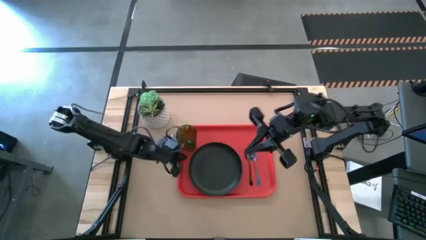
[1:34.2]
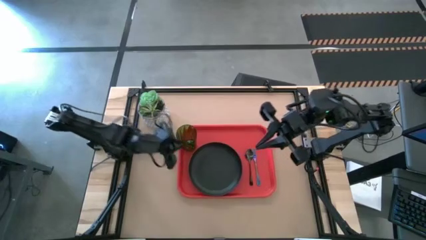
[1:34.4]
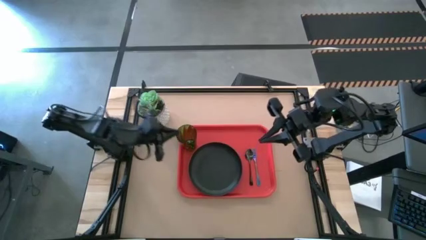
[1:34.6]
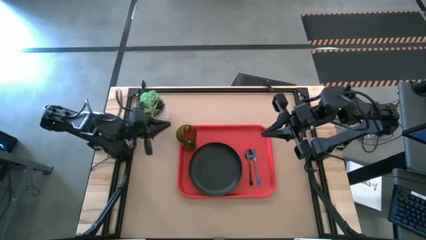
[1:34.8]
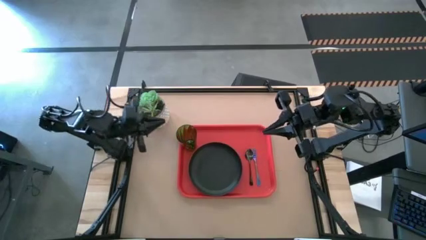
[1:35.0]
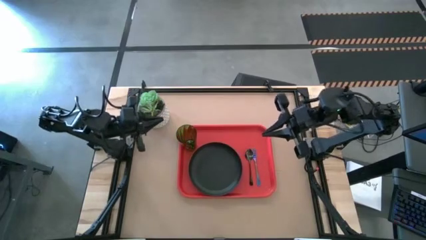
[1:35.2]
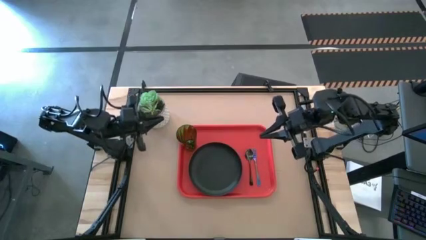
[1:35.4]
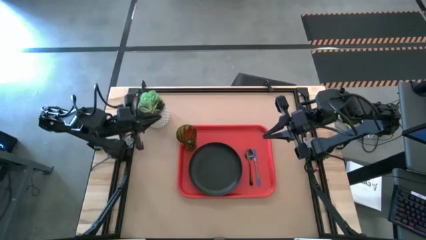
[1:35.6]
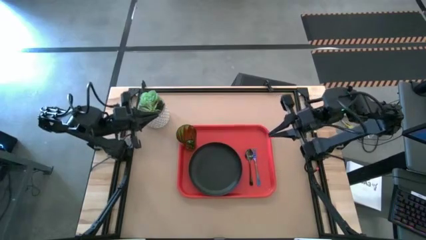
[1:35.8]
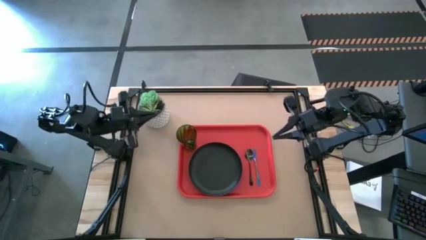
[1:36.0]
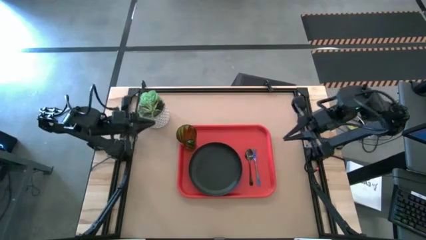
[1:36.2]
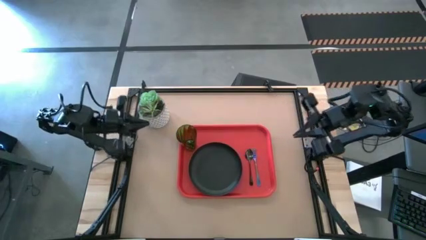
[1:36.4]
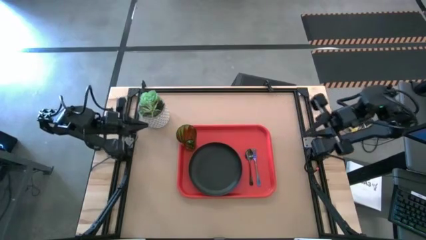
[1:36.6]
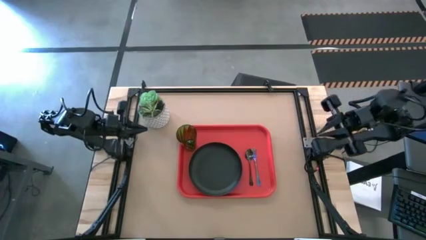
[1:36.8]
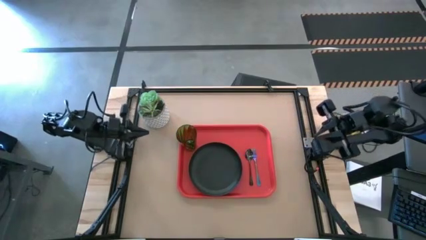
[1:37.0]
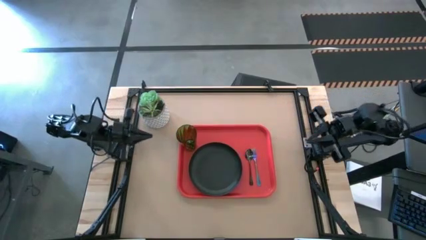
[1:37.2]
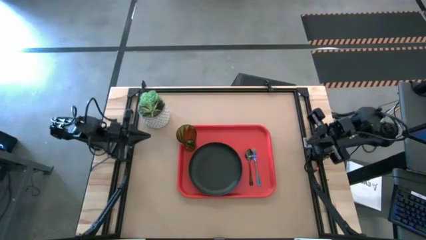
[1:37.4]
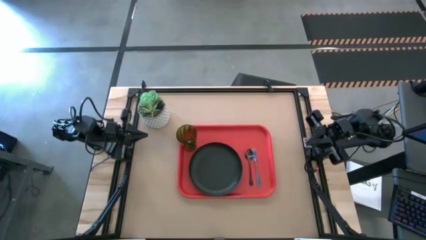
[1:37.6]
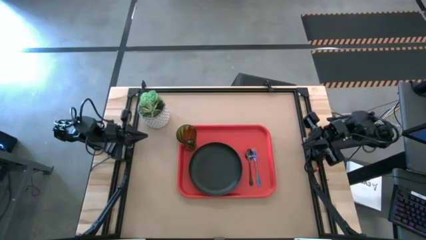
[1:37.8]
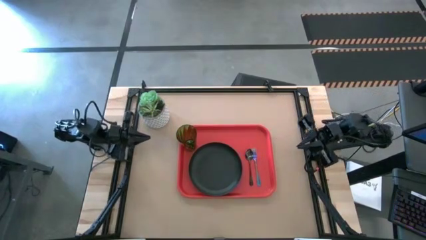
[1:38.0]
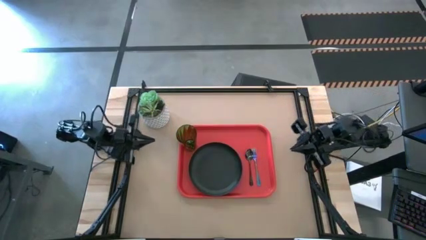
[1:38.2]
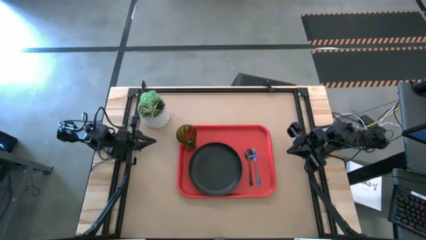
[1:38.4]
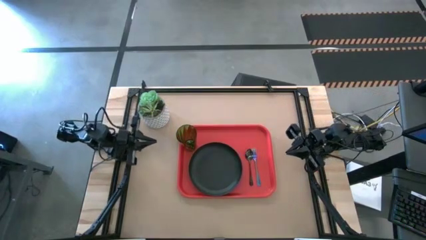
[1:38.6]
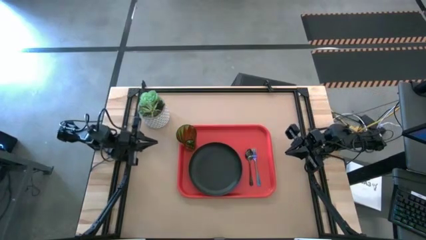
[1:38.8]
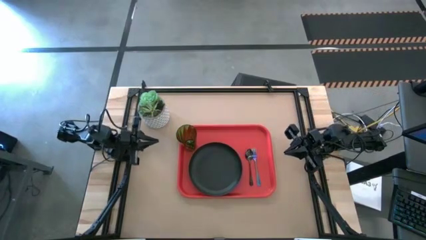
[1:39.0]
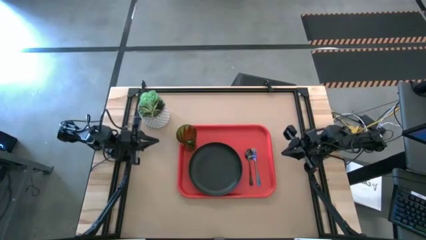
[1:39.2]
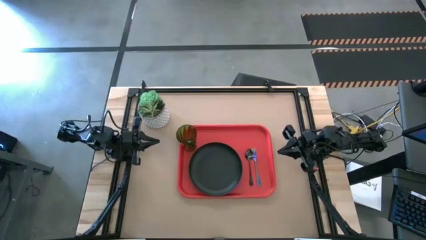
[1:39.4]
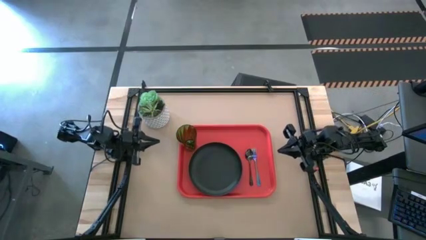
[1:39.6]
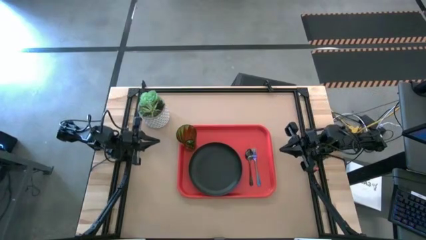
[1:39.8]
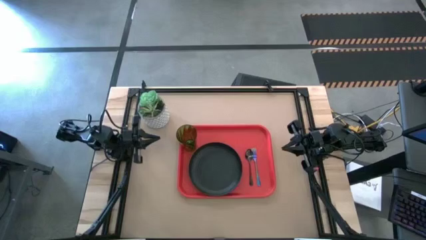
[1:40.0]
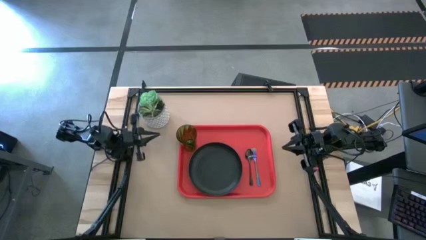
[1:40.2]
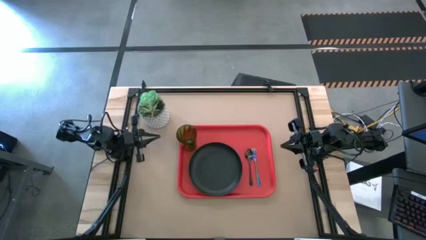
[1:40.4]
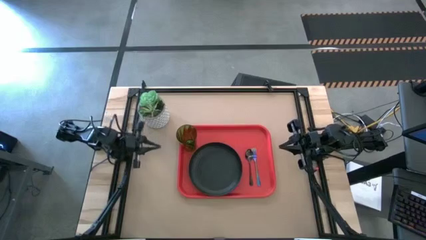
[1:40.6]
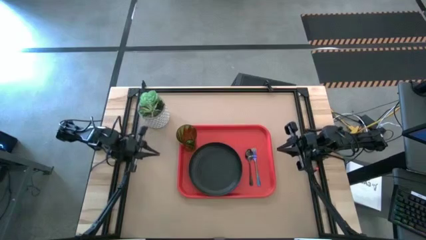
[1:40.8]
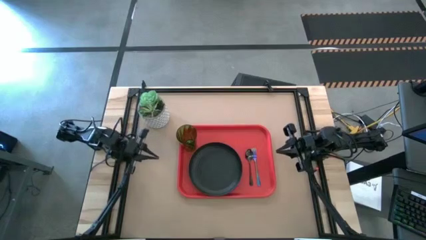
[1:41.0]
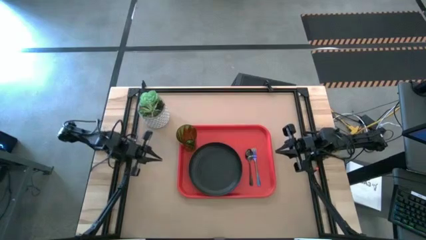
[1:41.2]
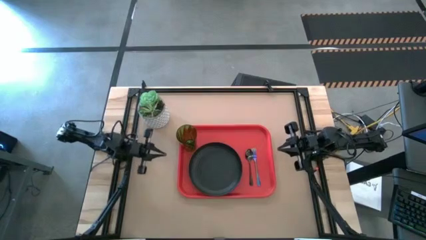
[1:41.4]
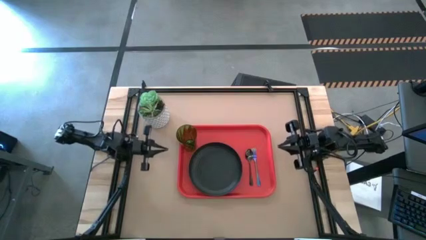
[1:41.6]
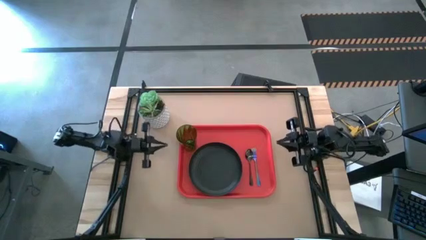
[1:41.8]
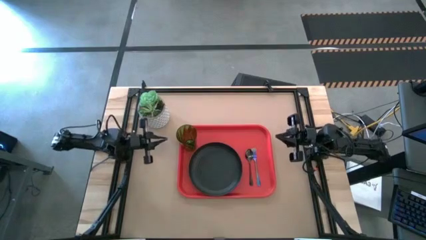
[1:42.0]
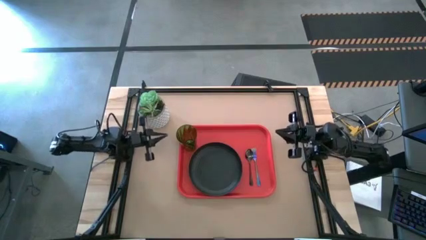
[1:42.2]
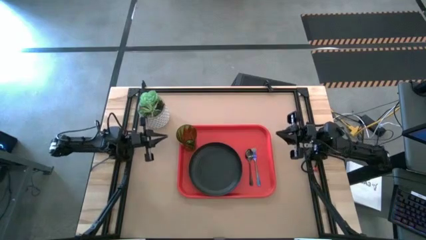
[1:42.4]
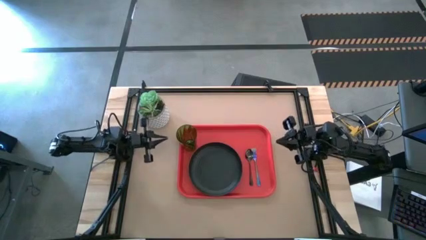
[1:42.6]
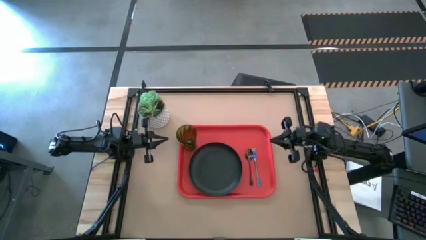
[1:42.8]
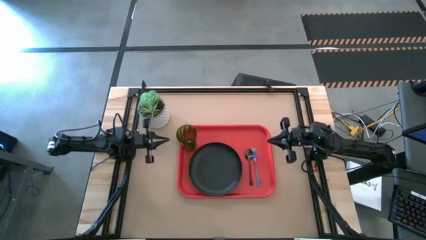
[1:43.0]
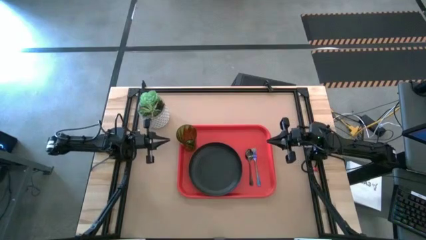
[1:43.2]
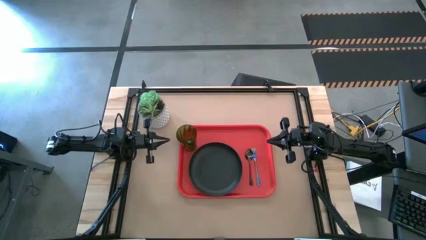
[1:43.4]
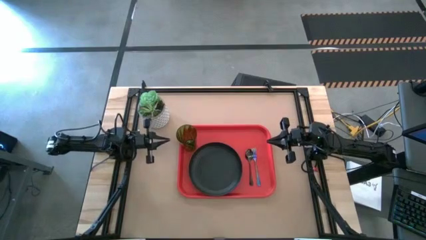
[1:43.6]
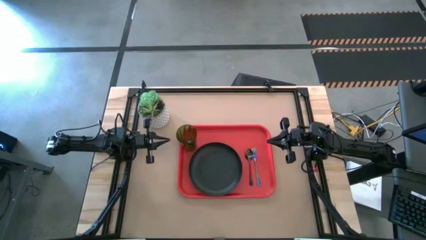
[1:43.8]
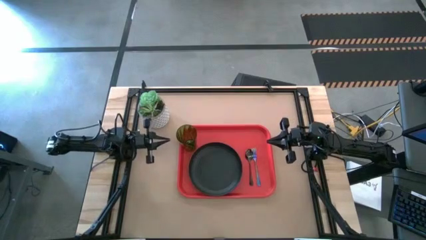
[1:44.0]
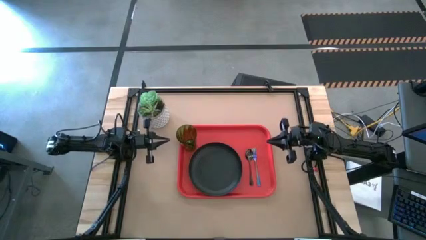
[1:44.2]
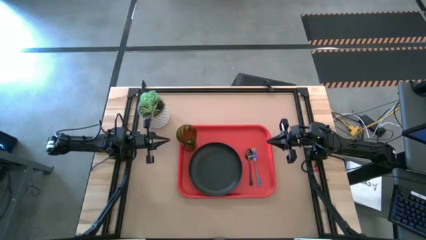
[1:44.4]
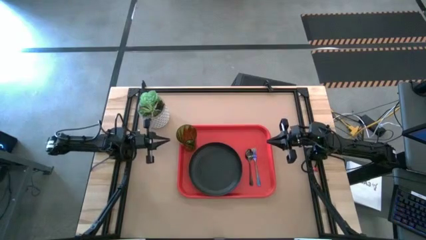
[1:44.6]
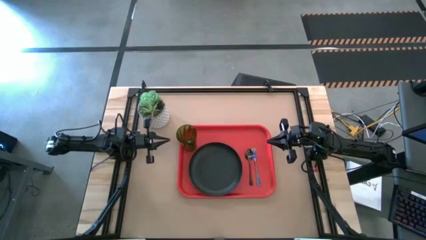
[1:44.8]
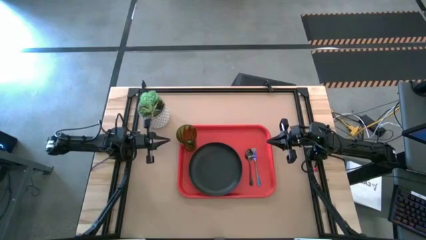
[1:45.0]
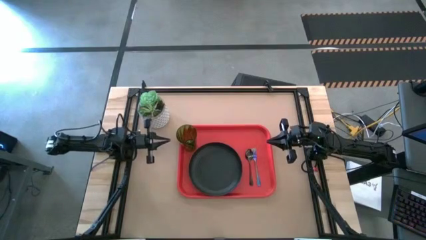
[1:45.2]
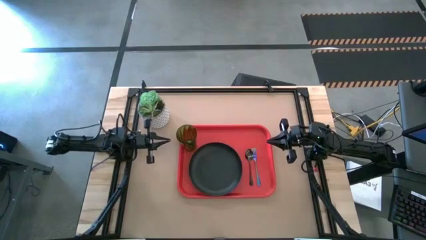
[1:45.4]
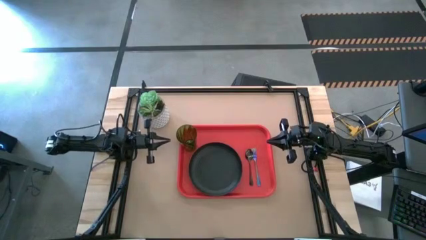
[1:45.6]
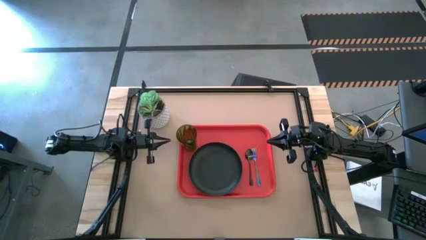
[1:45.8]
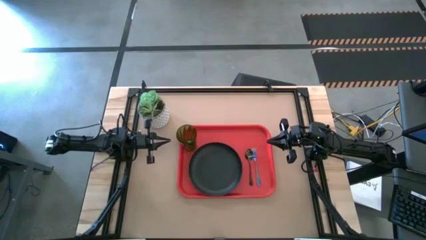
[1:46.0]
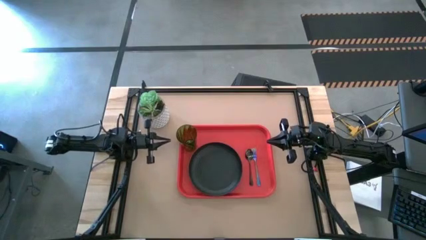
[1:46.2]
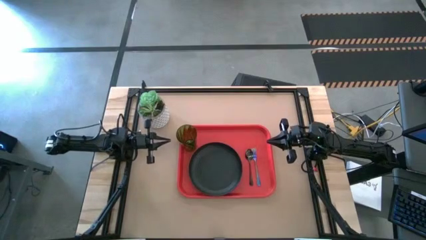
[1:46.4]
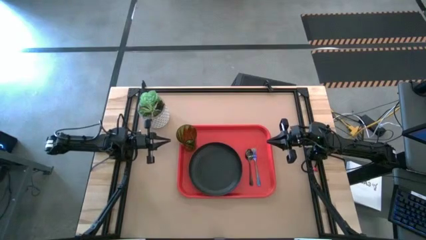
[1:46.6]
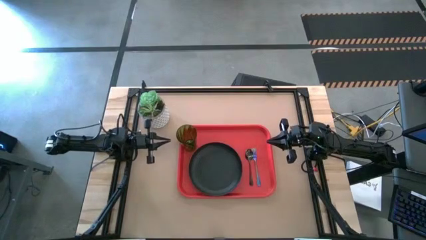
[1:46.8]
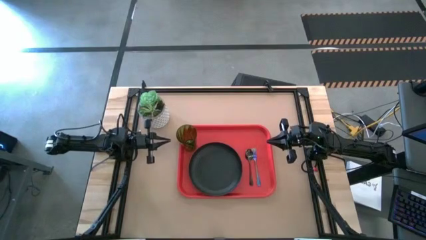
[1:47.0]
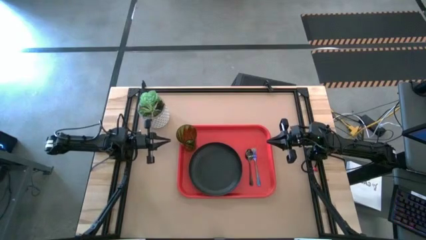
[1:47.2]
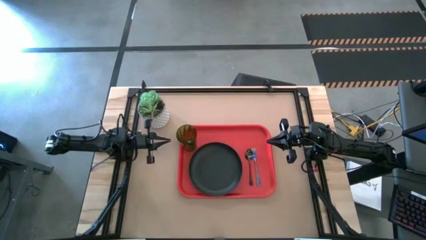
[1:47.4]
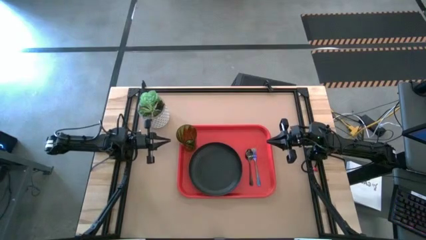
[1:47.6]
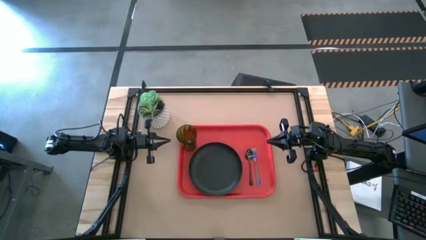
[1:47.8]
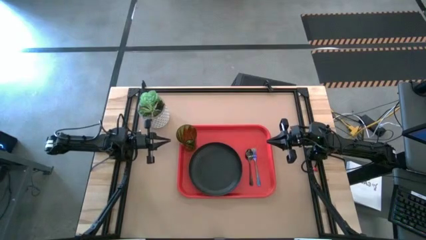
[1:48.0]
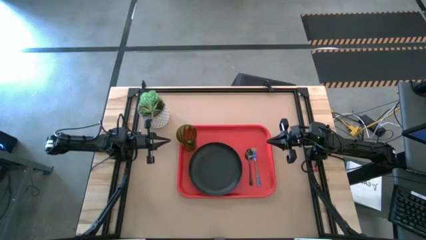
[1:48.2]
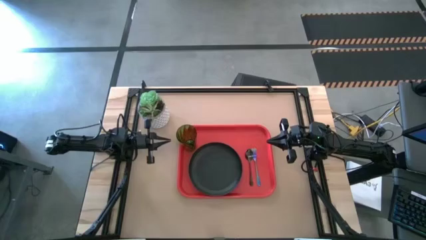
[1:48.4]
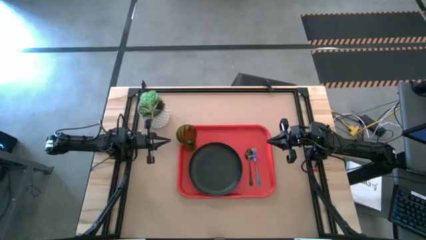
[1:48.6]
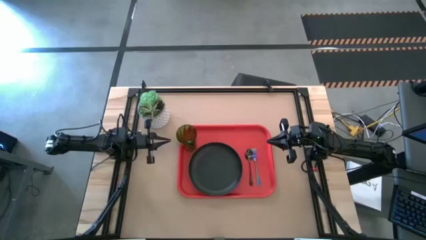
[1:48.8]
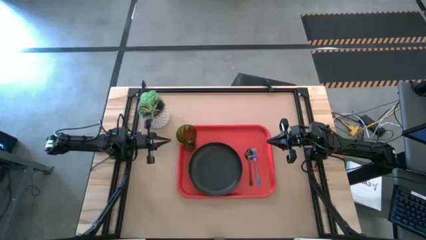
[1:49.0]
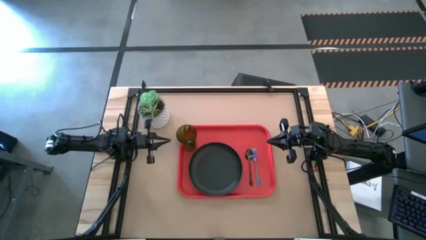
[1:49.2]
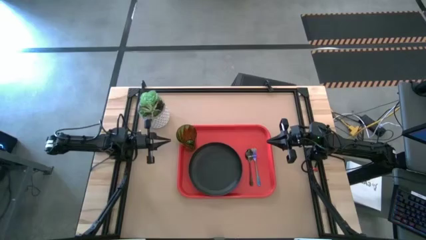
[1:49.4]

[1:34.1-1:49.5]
Task: Pick and place plate/cup/fork/spoon on tray
Return to Home Position
